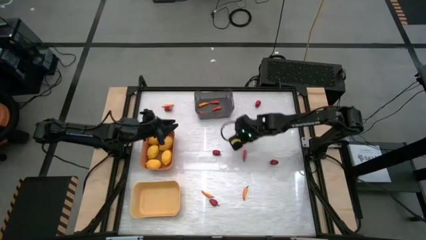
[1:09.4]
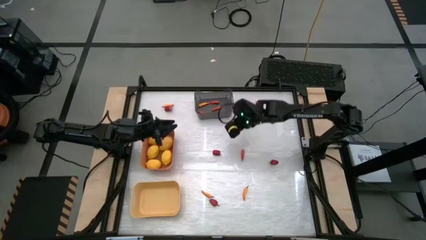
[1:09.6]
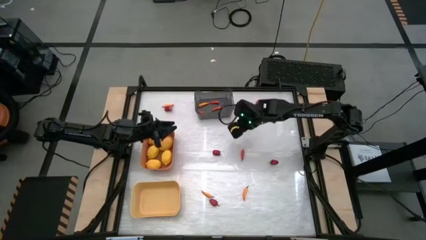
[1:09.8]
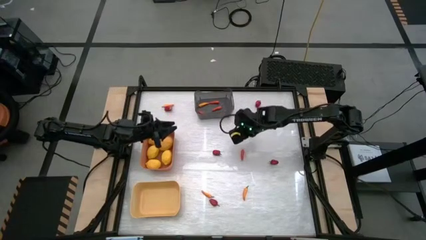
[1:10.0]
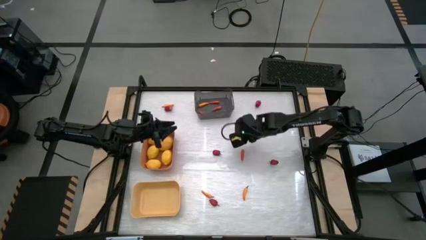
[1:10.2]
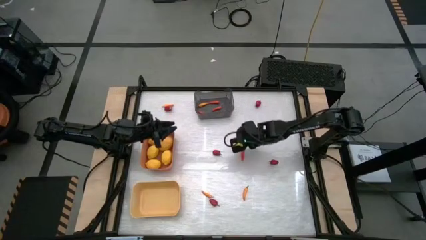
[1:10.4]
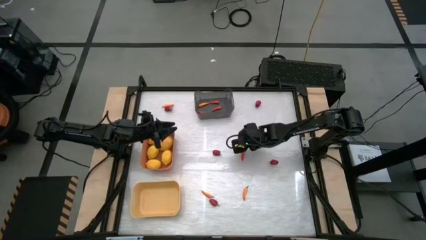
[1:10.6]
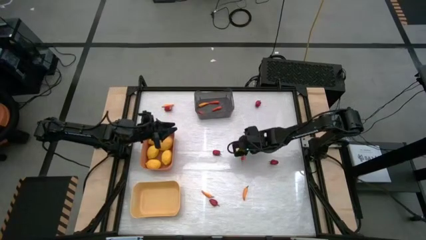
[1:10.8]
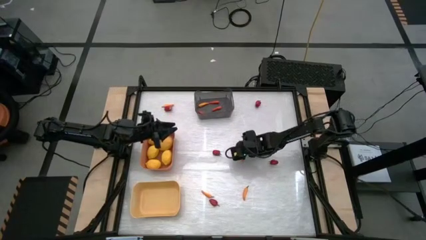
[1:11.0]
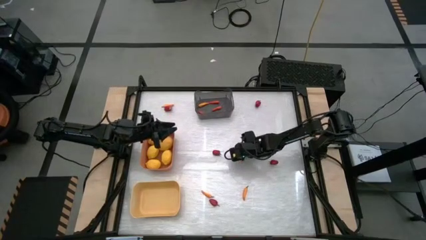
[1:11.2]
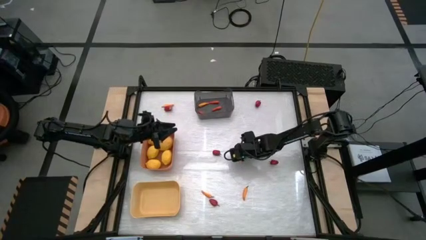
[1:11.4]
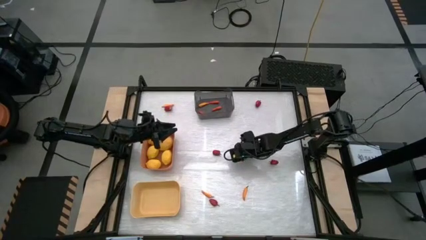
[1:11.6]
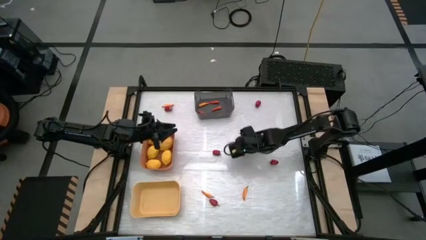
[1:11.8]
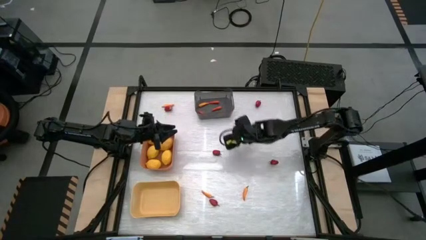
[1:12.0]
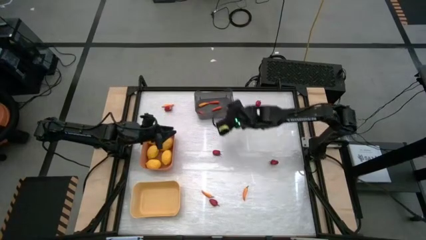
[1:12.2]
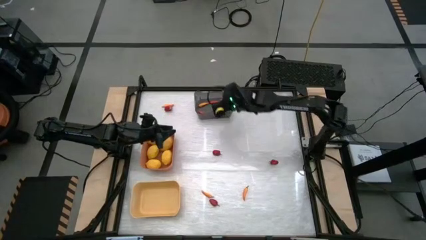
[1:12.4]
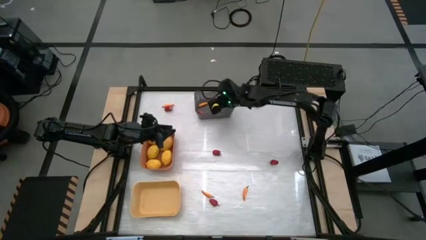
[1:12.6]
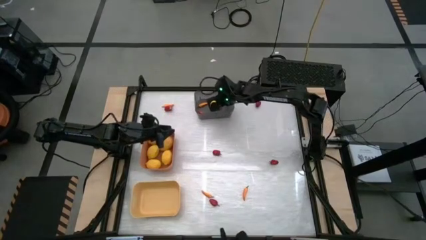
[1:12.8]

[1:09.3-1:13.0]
Task: Sort produce into baskets
Put the red bell pepper into the black bin

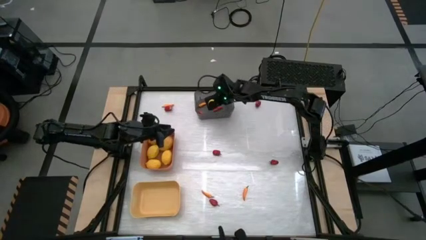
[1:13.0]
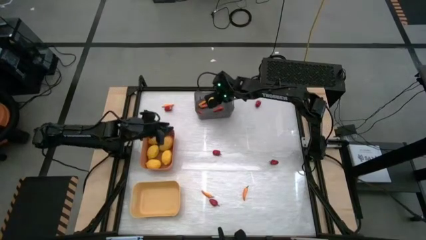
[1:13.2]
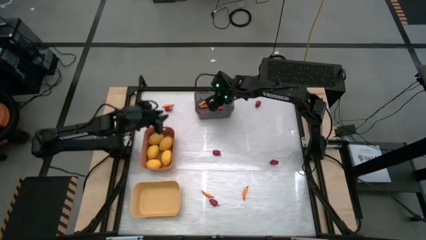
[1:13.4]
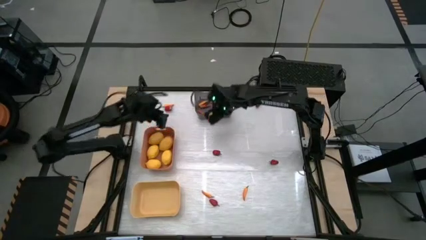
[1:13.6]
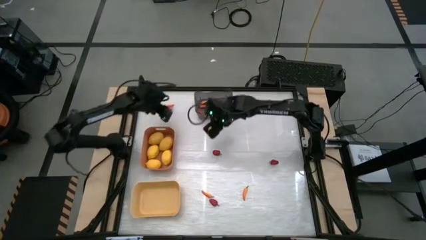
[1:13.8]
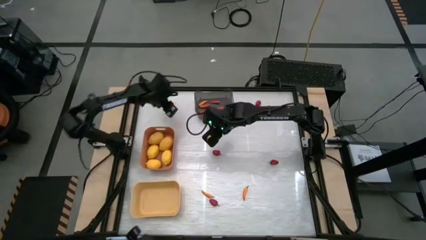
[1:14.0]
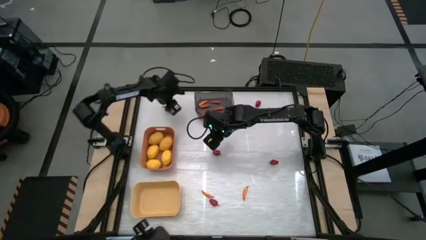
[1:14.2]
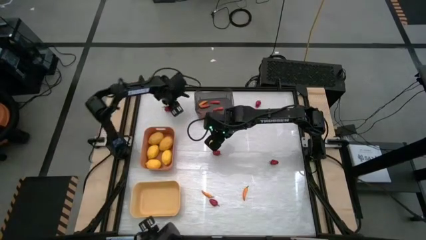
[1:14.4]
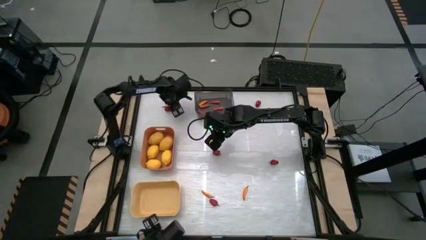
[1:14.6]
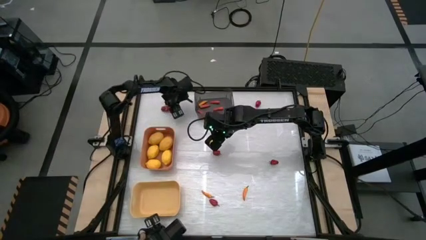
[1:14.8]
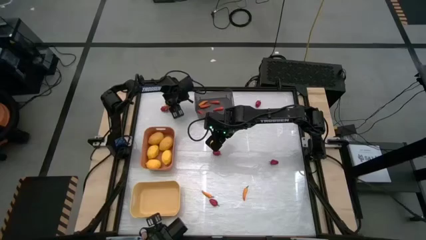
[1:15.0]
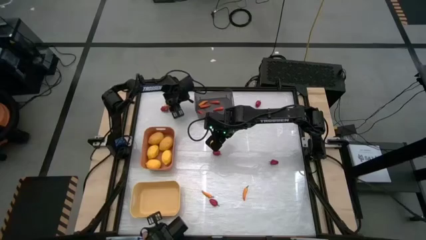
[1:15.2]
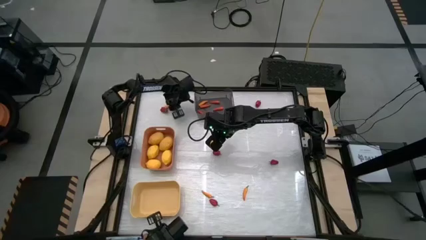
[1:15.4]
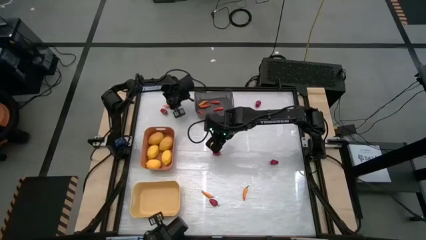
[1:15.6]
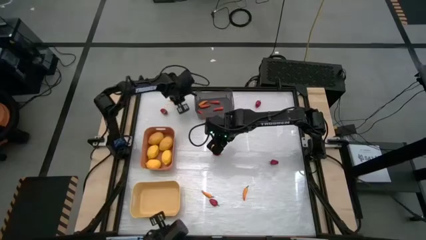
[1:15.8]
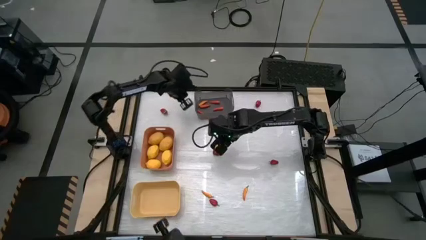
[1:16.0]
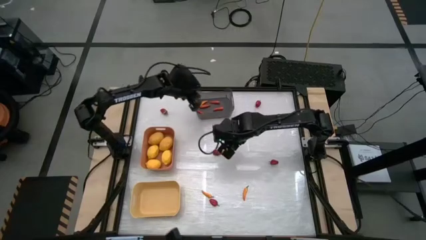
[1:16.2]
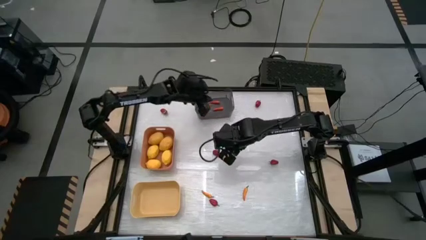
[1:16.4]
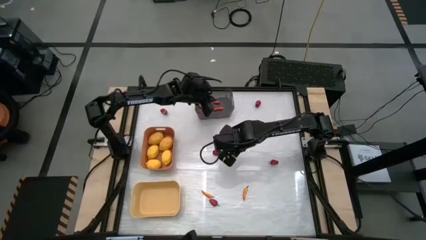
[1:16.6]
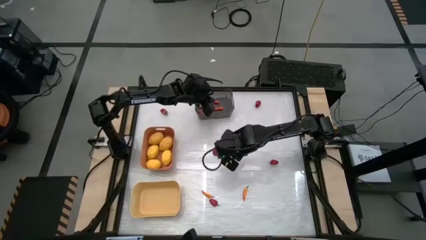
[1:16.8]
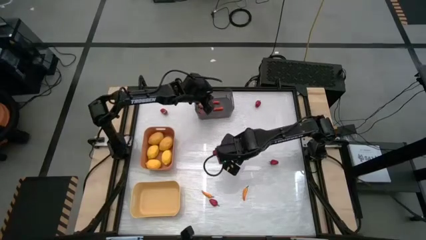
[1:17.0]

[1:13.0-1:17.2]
Put the orange chili pepper into the black bin

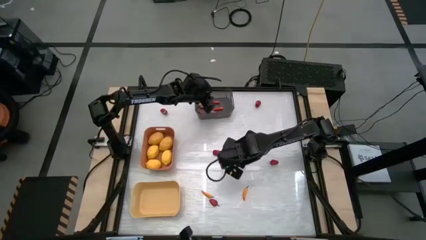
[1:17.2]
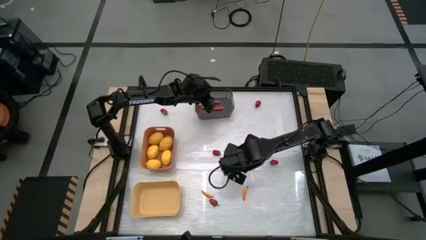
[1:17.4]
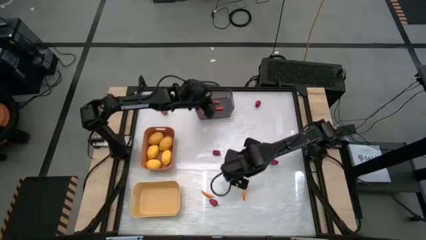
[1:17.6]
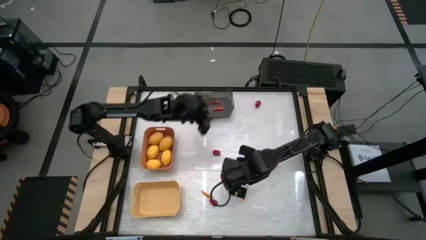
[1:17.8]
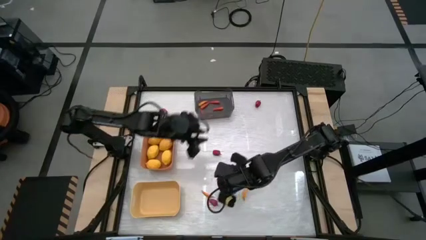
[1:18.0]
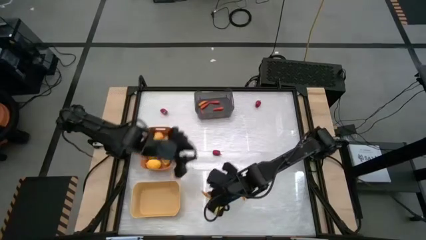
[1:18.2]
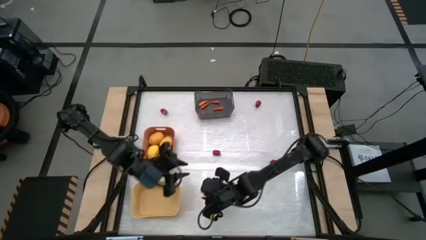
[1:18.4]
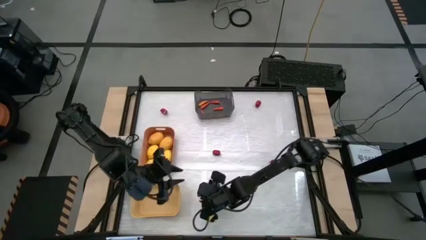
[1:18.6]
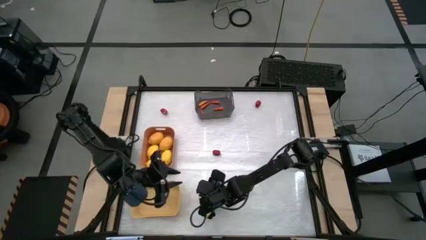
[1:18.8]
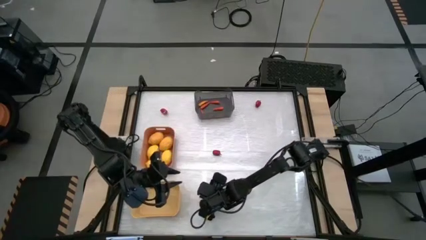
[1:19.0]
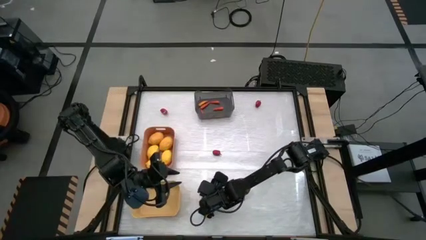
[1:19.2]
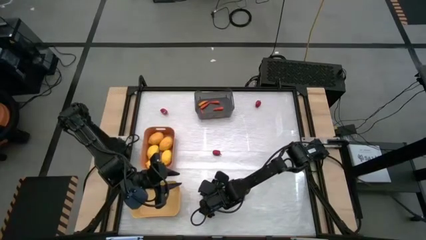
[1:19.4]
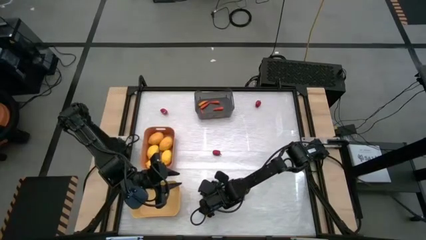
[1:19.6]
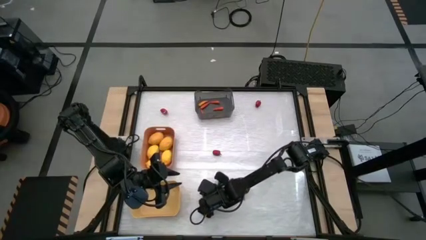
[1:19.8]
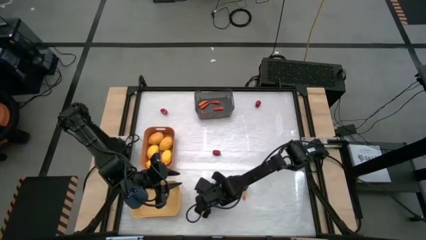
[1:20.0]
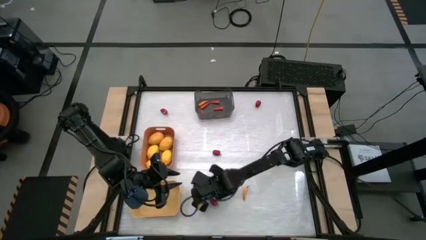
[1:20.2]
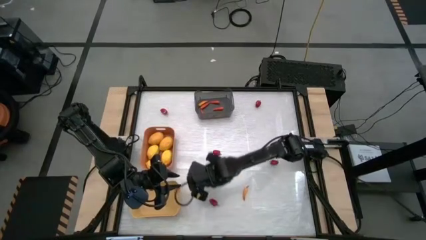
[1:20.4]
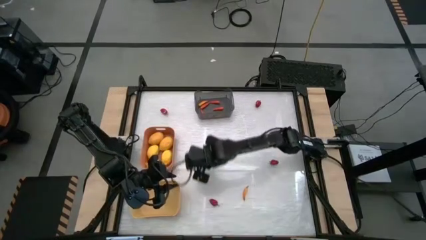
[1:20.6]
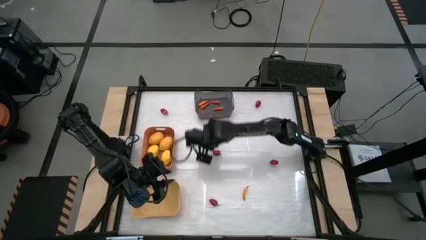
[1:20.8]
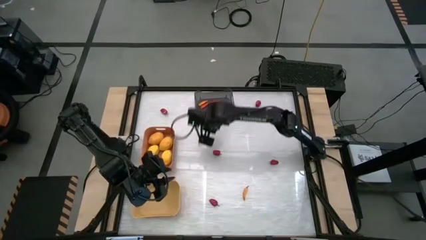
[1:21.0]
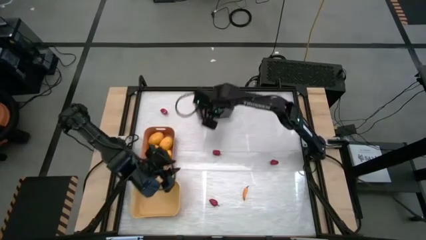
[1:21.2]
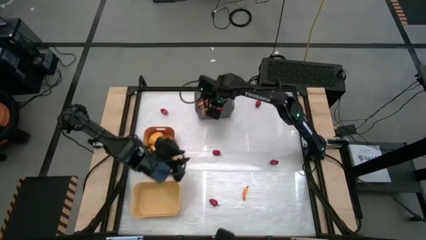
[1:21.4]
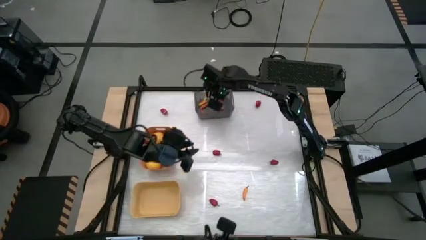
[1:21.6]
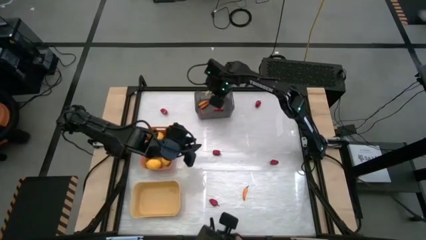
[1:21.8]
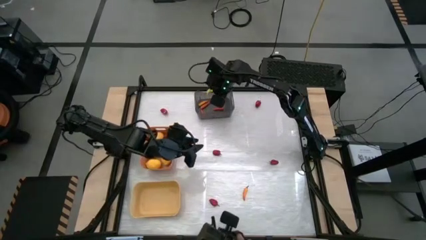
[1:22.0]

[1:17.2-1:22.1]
Put the orange chili pepper into the black bin

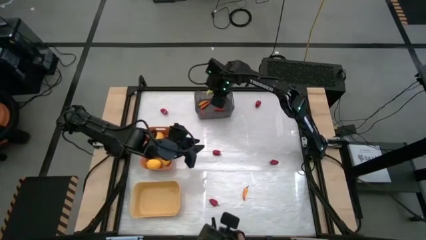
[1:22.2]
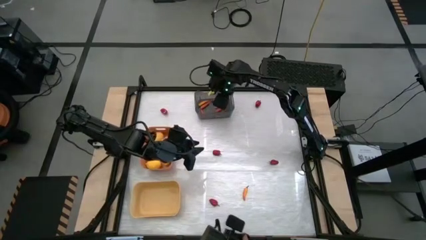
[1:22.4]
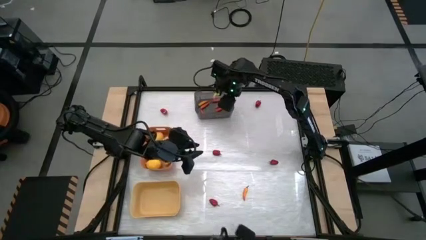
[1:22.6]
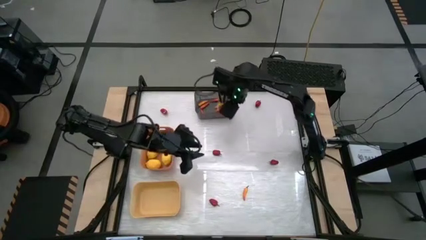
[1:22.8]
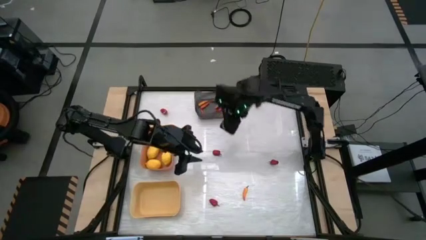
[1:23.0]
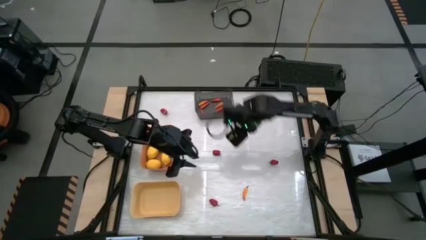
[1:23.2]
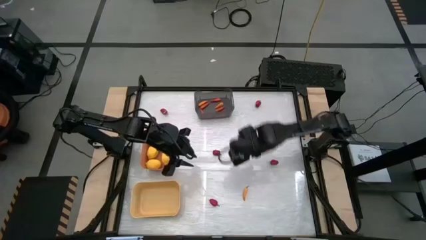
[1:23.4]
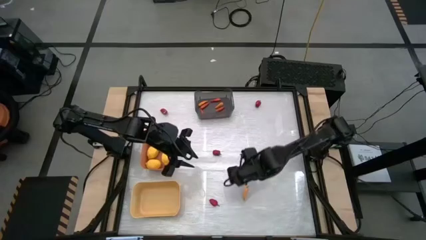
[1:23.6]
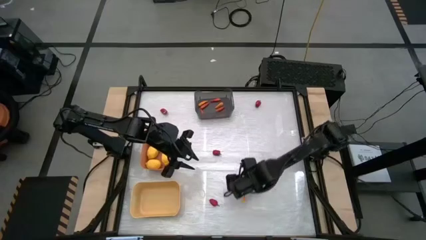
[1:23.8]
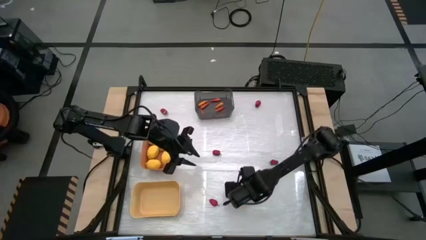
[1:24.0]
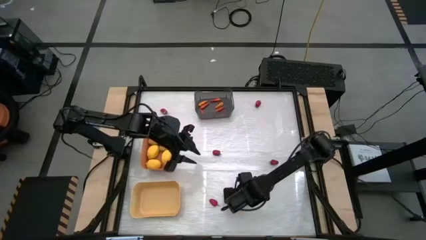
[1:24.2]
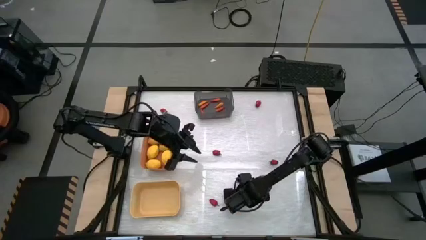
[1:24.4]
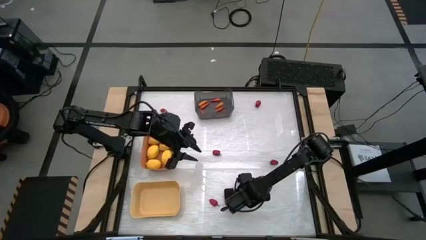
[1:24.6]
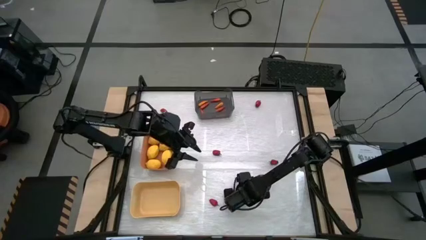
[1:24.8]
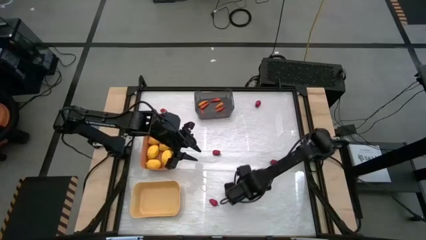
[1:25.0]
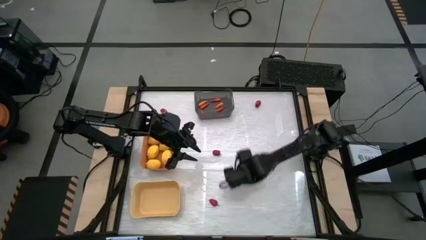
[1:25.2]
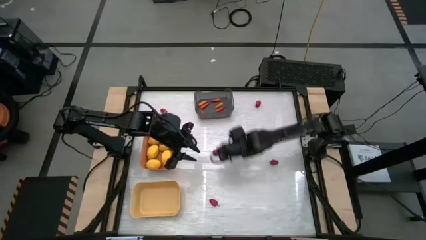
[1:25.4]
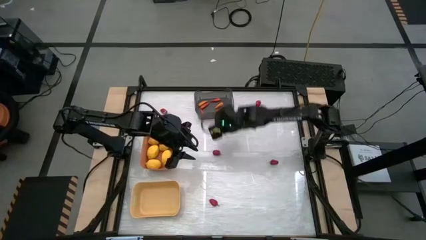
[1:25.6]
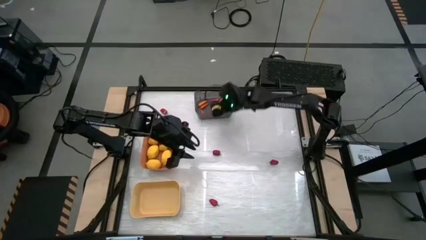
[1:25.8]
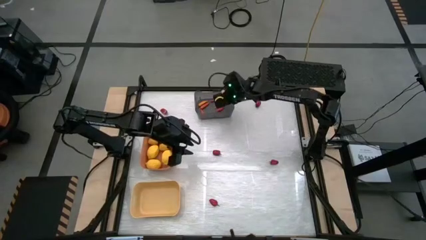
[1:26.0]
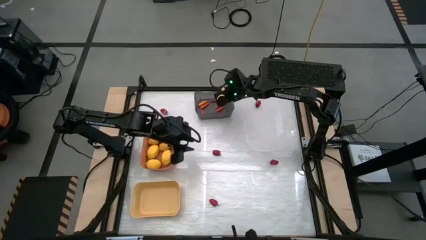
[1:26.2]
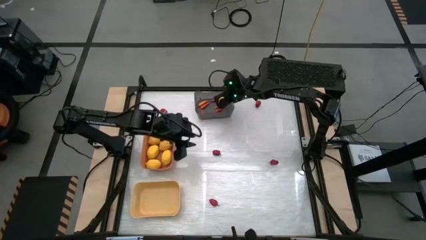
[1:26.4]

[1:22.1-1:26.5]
Put the orange chili pepper into the black bin
